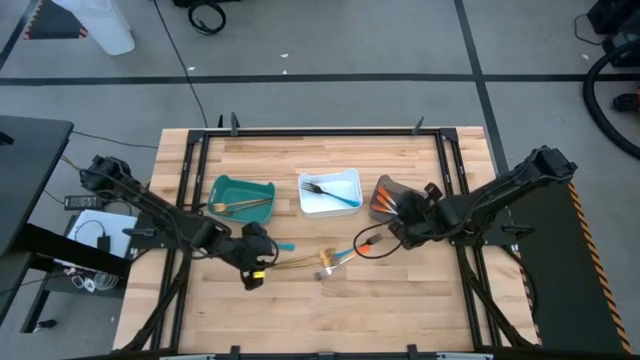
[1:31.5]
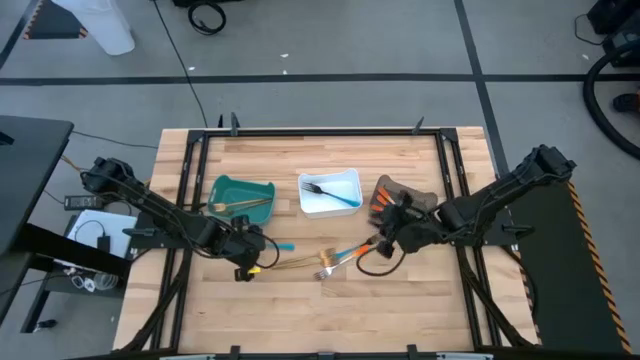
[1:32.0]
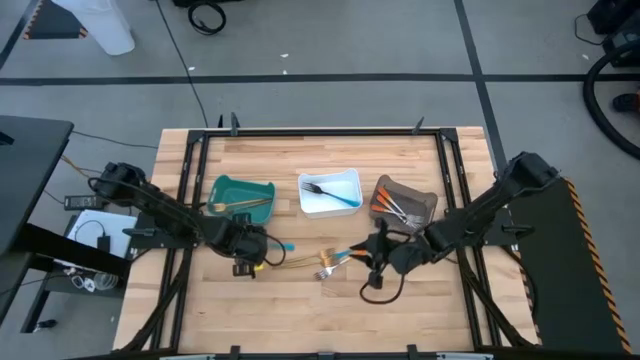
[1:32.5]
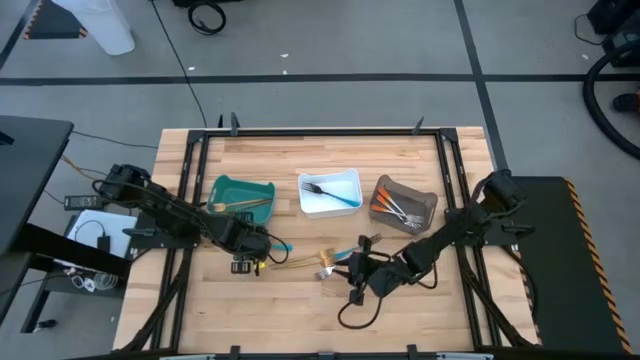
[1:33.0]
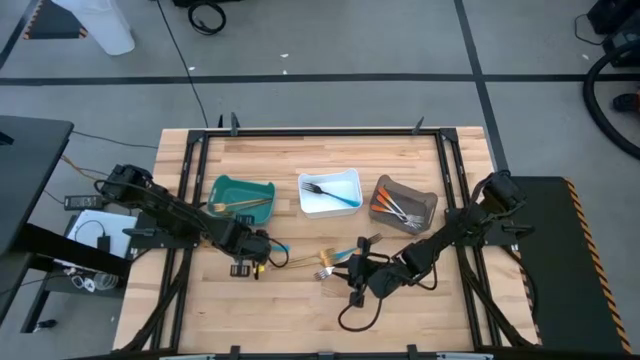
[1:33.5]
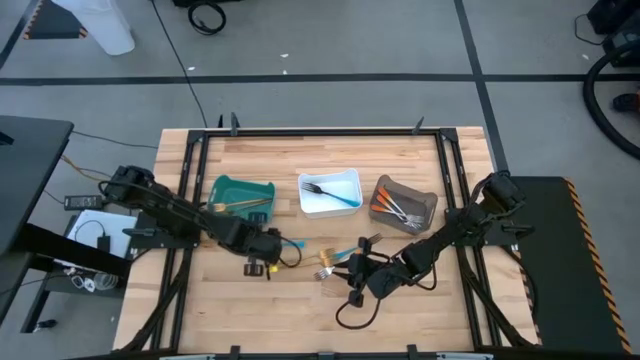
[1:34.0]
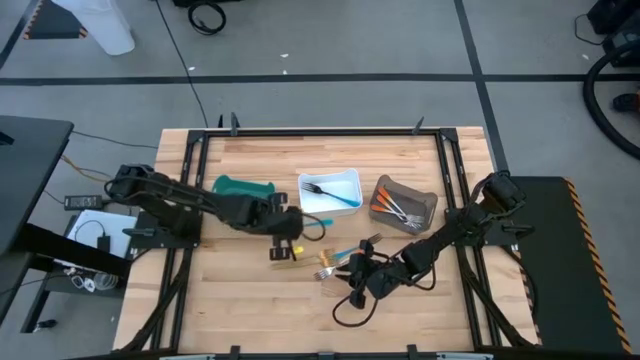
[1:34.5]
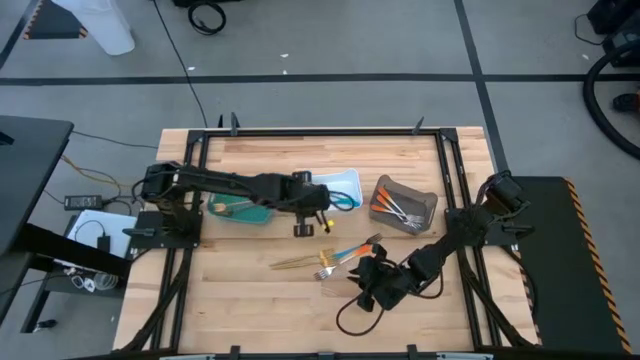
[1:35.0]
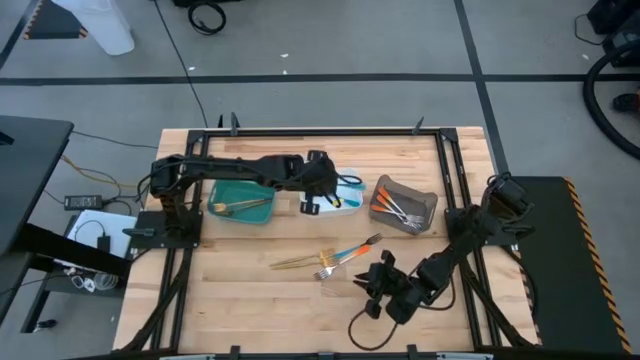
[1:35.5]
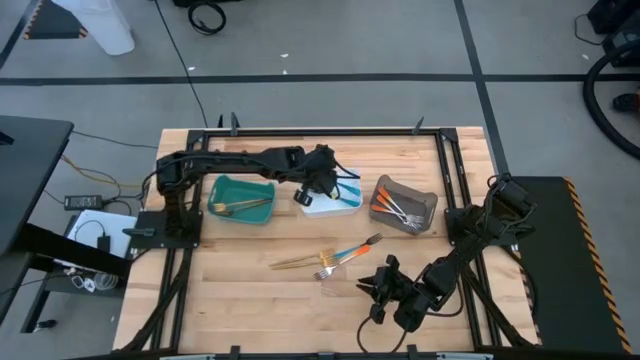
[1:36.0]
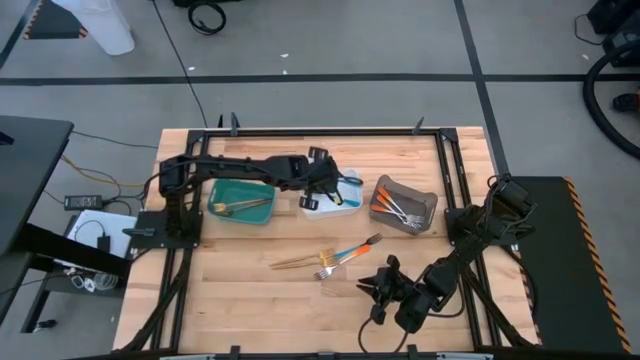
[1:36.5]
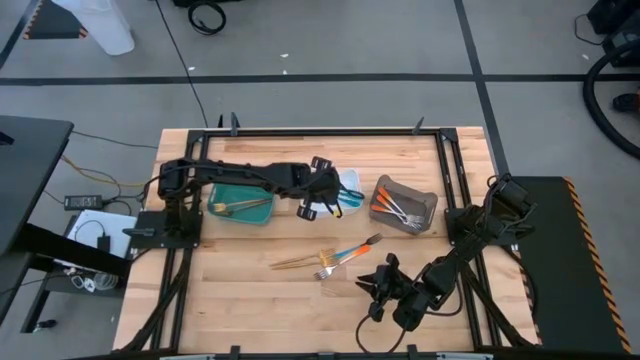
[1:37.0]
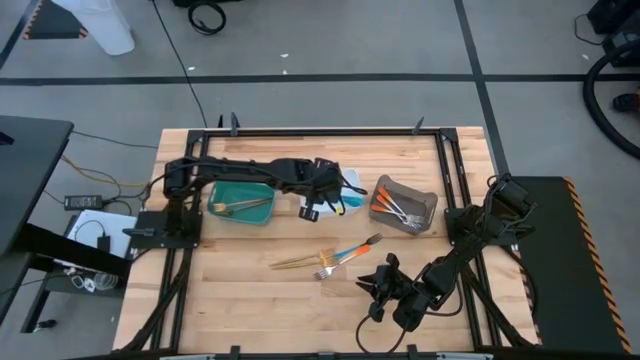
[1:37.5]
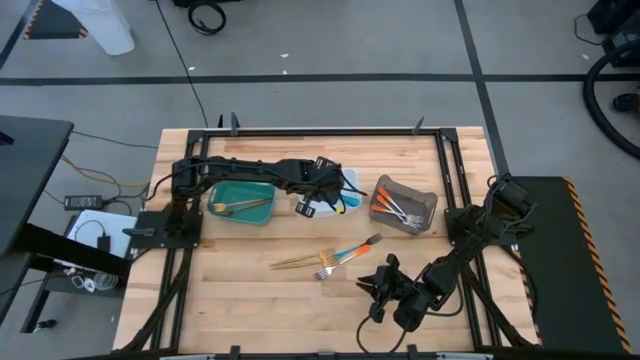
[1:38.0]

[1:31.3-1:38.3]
Task: Sort silverware by color (type)
Put the blue fork into the white bin

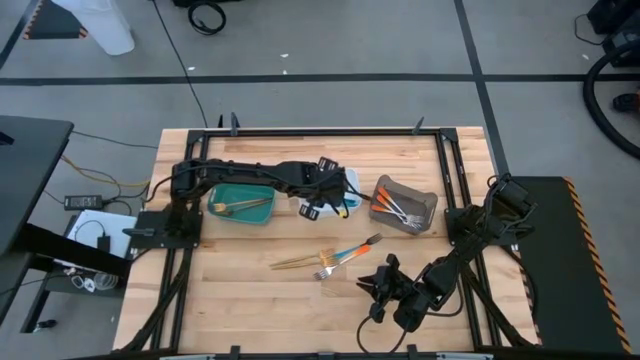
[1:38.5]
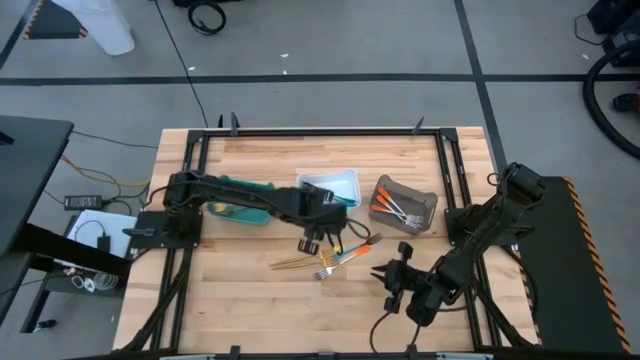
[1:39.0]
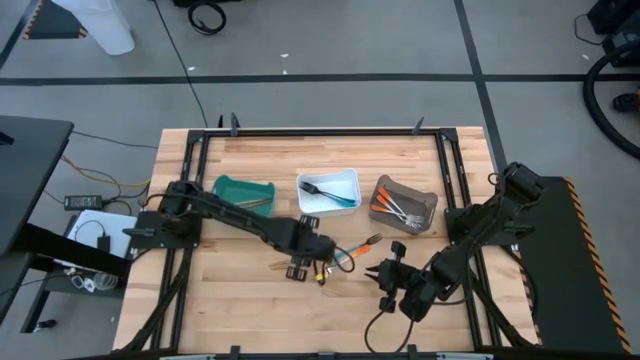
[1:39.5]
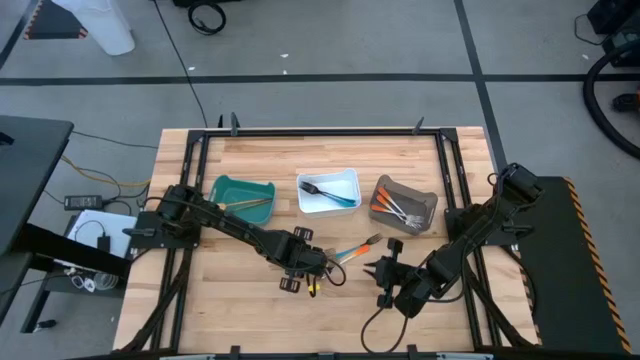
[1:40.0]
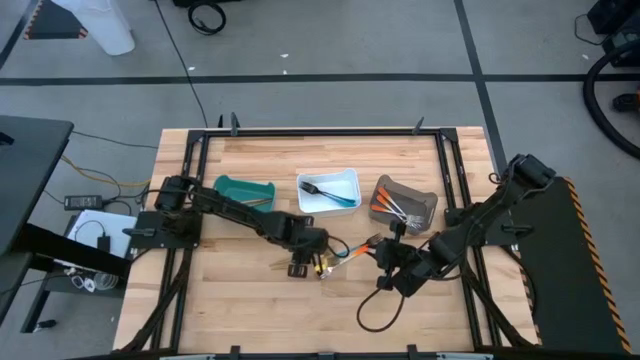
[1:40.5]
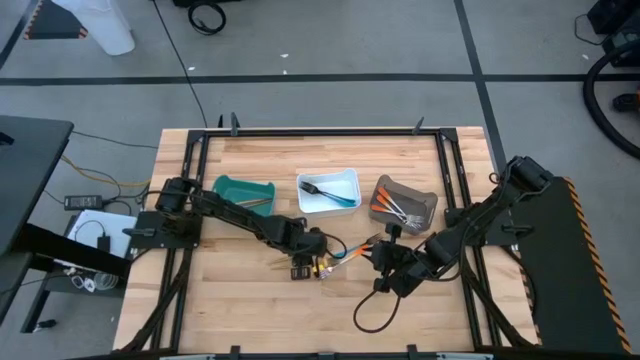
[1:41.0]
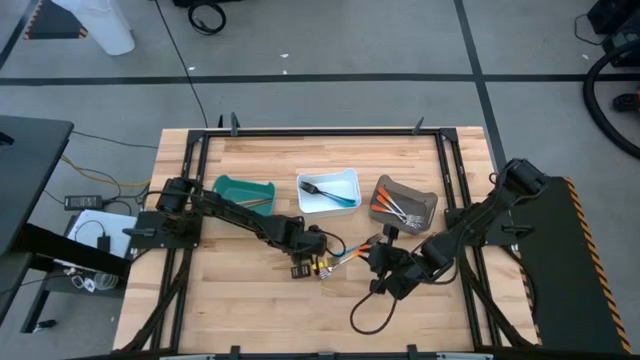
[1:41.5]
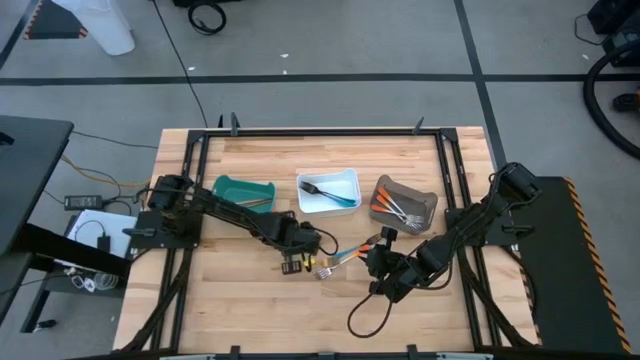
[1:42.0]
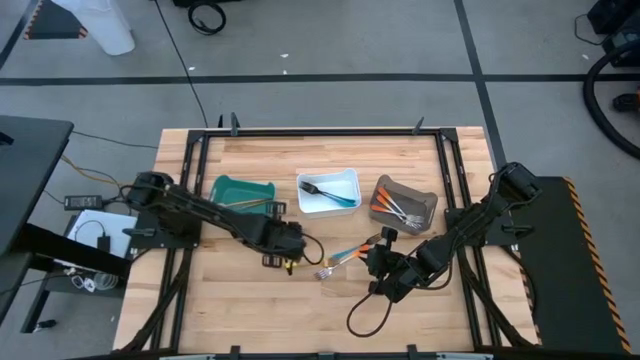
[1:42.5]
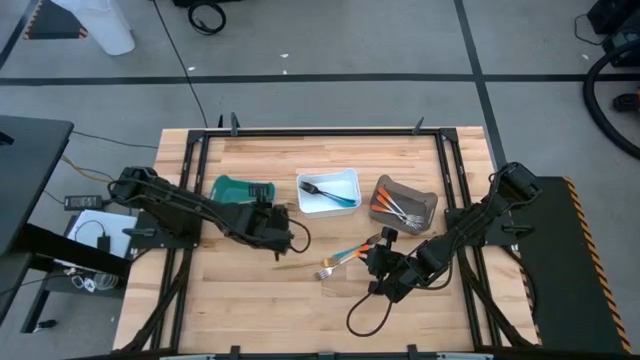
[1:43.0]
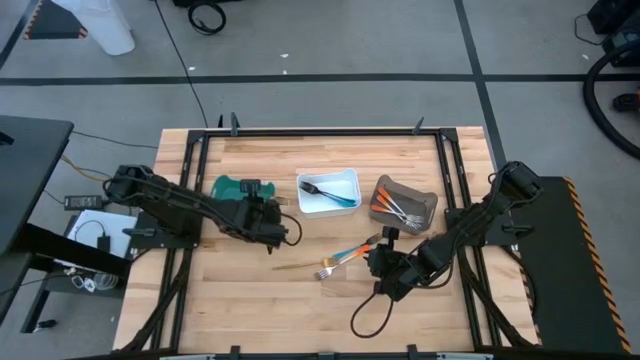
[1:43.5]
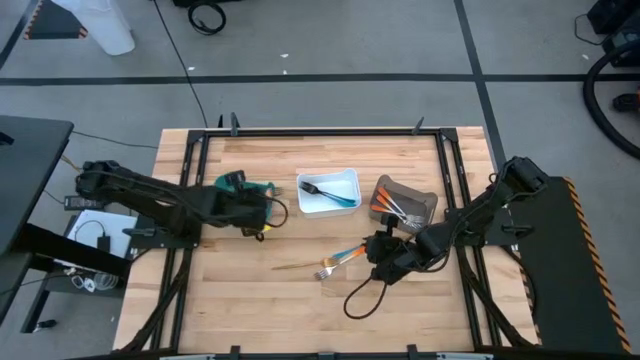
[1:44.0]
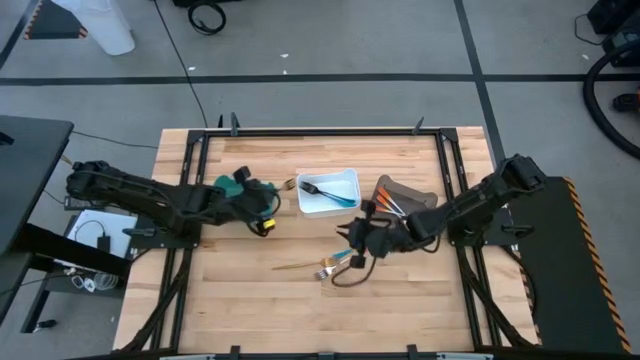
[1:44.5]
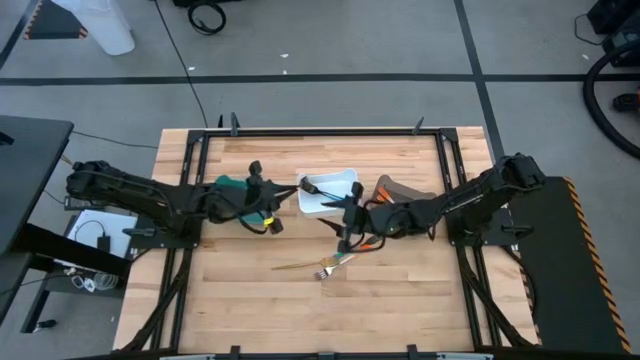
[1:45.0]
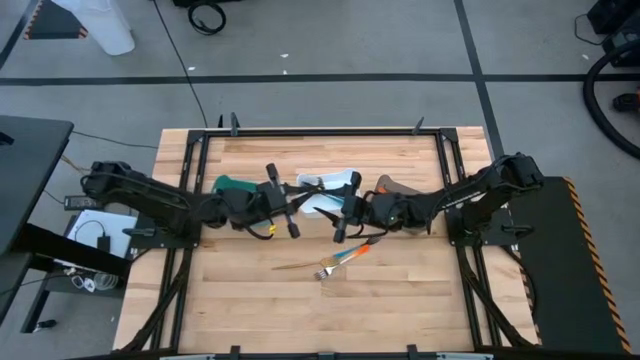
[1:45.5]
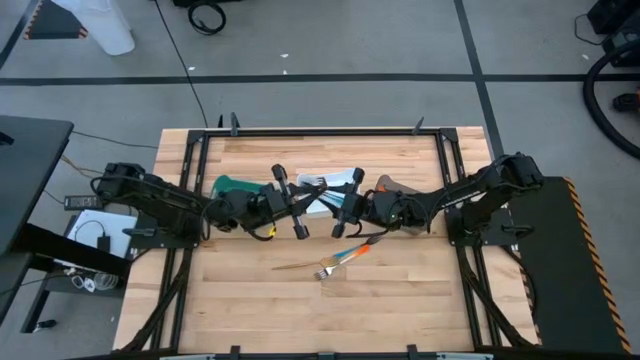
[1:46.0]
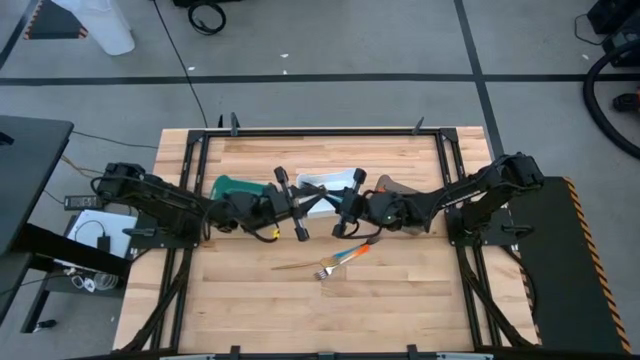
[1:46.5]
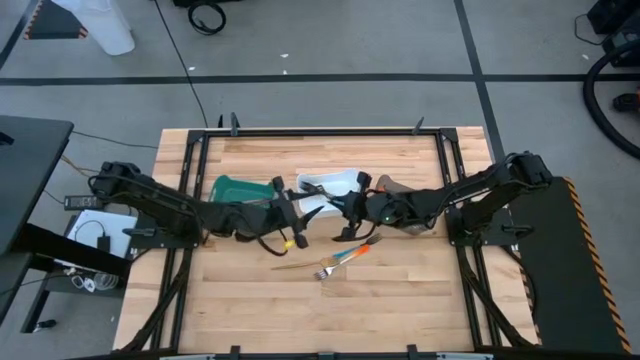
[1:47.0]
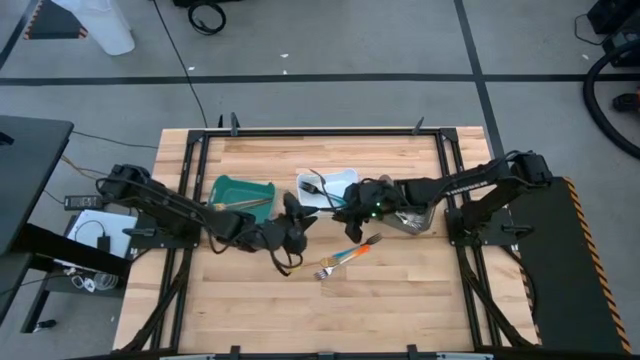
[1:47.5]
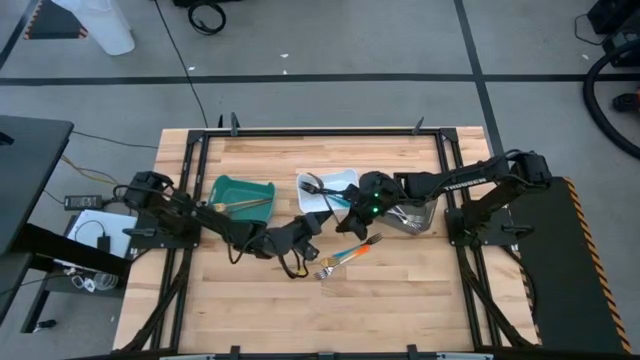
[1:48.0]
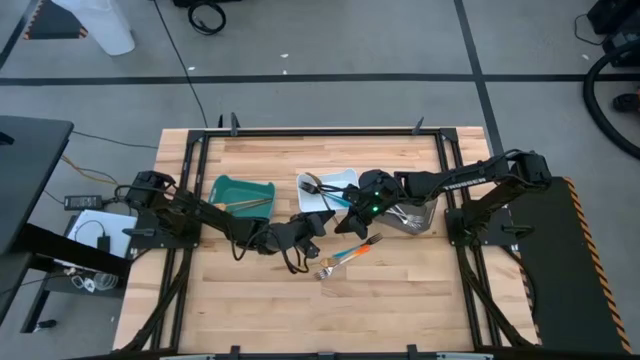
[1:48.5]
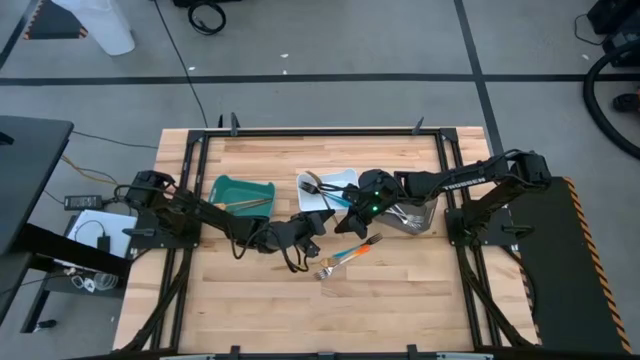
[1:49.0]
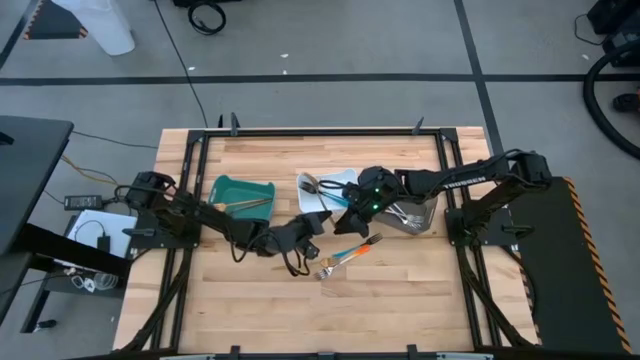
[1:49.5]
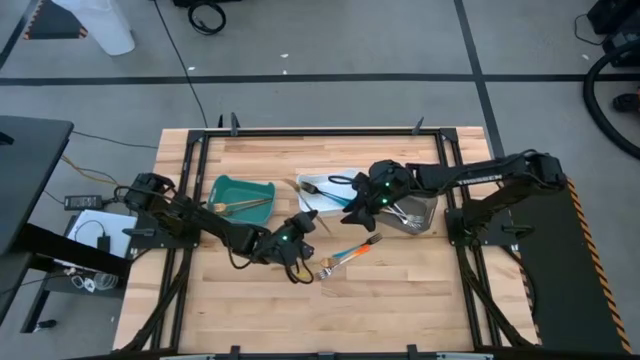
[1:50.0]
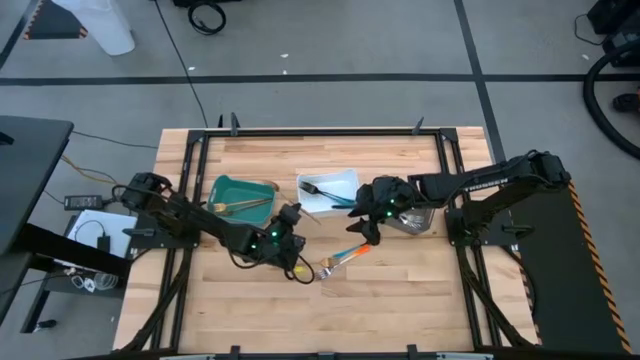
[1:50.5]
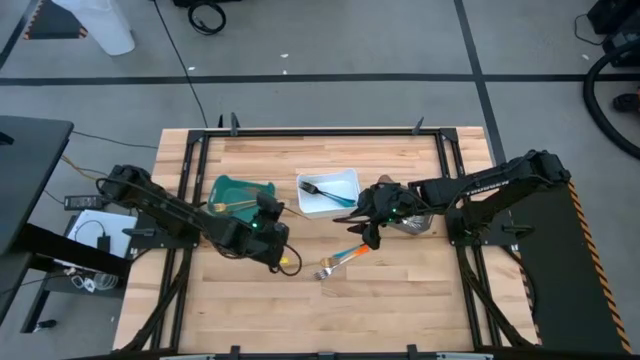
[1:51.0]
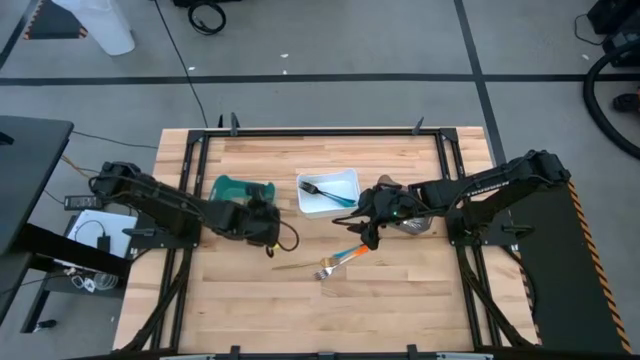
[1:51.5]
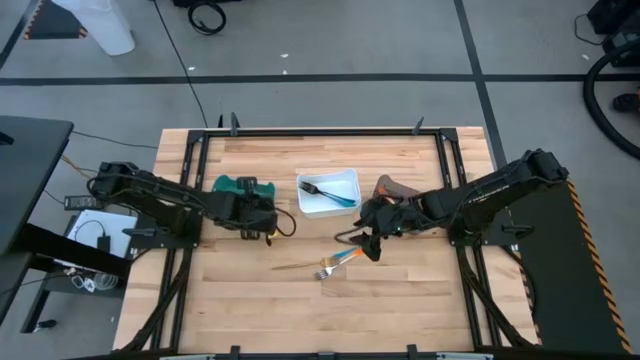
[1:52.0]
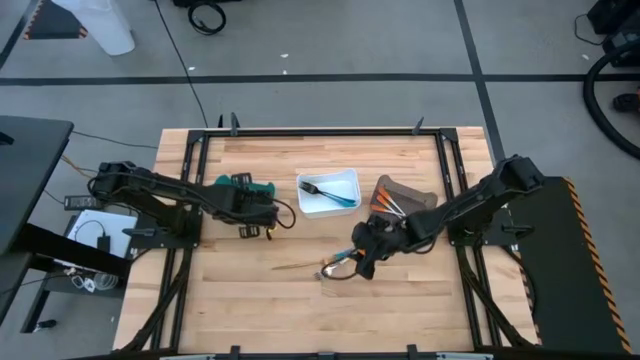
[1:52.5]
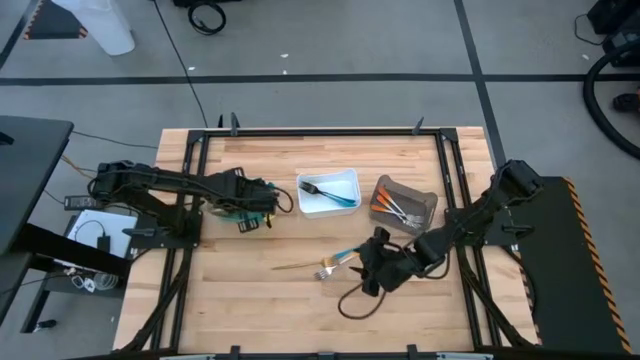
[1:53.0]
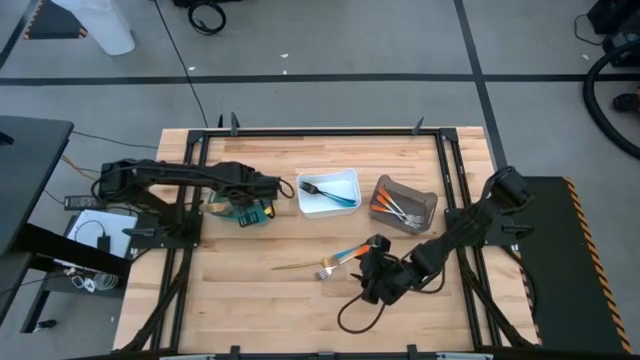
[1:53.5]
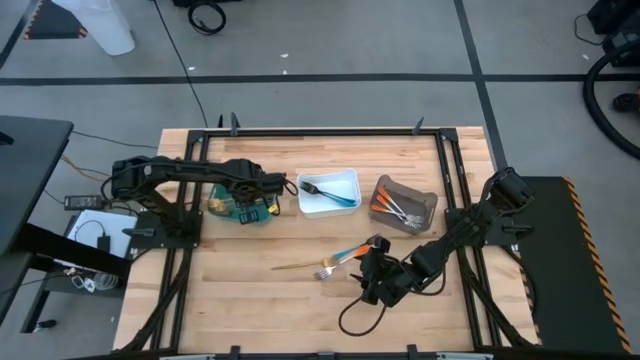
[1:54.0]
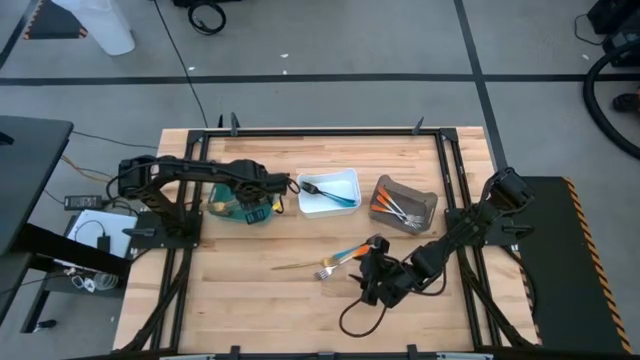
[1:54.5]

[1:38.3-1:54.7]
Put the gold fork into the green bin
